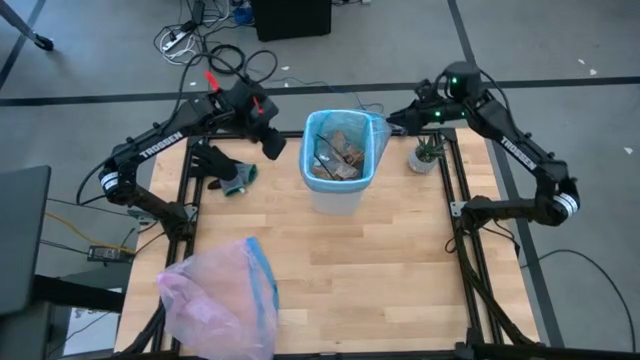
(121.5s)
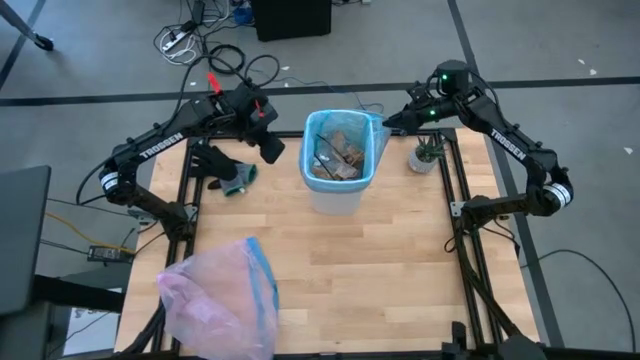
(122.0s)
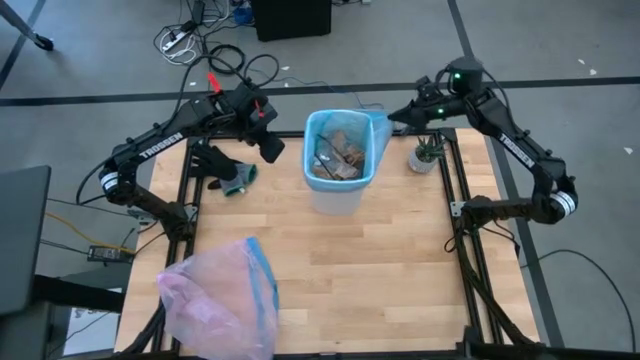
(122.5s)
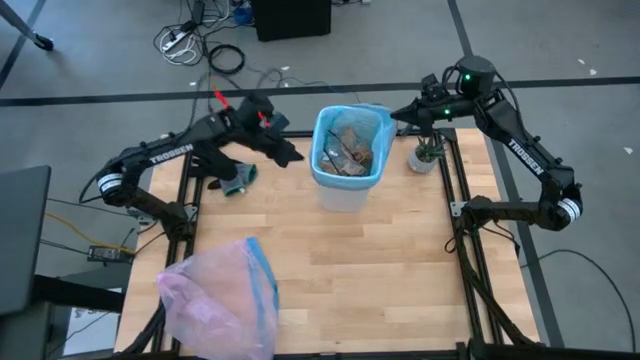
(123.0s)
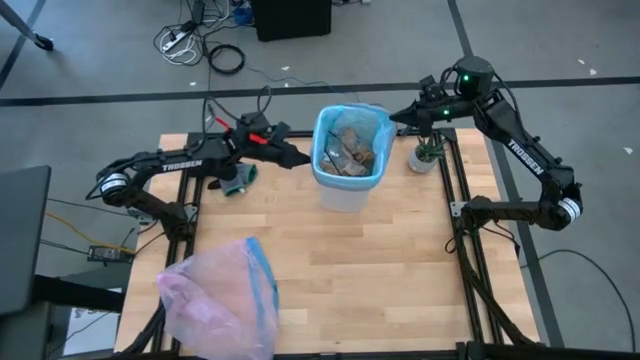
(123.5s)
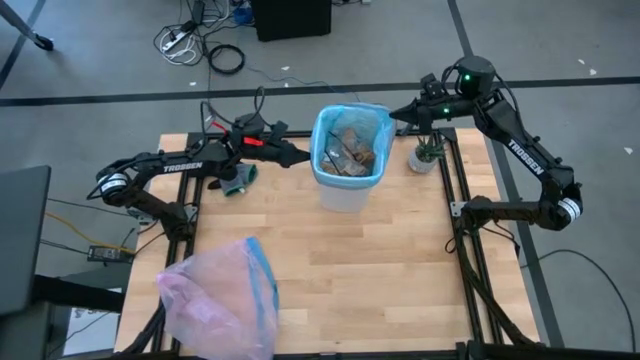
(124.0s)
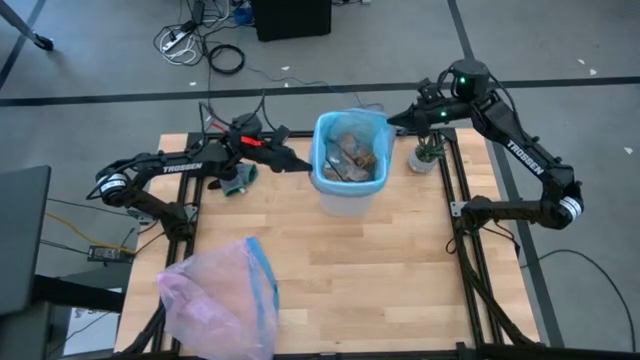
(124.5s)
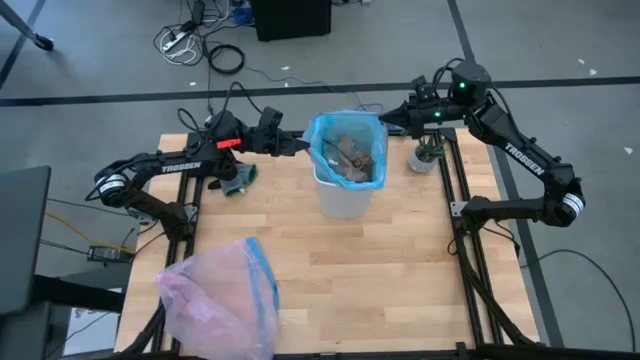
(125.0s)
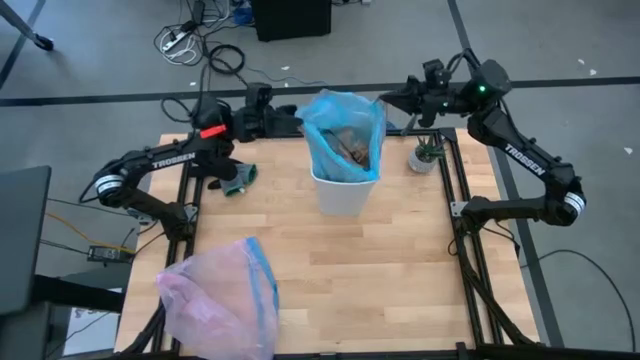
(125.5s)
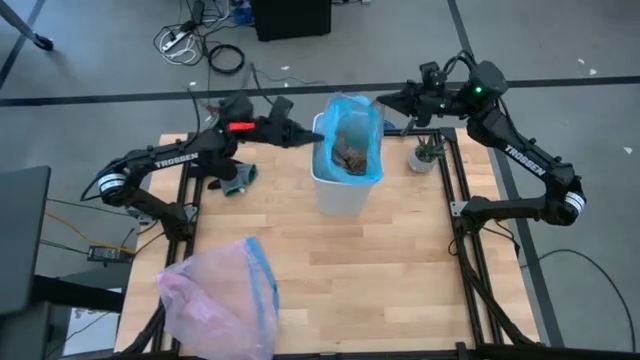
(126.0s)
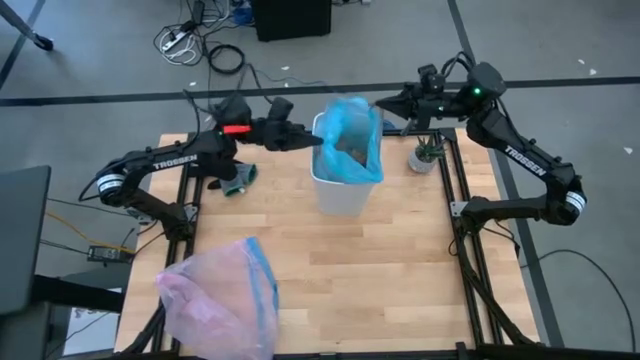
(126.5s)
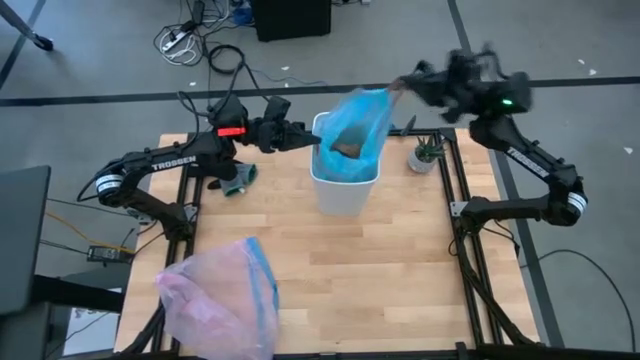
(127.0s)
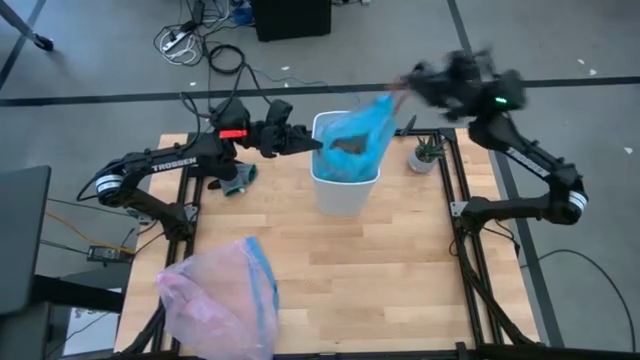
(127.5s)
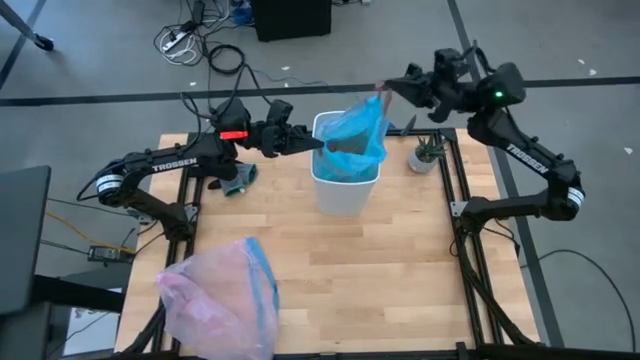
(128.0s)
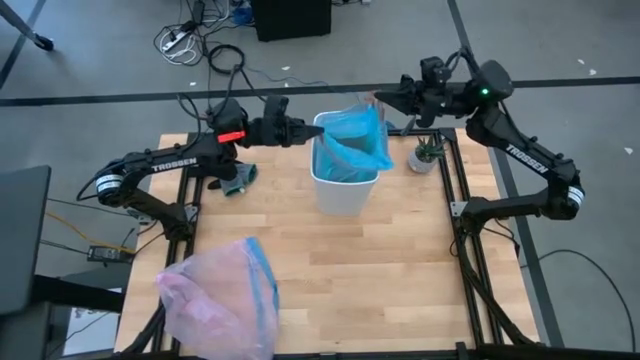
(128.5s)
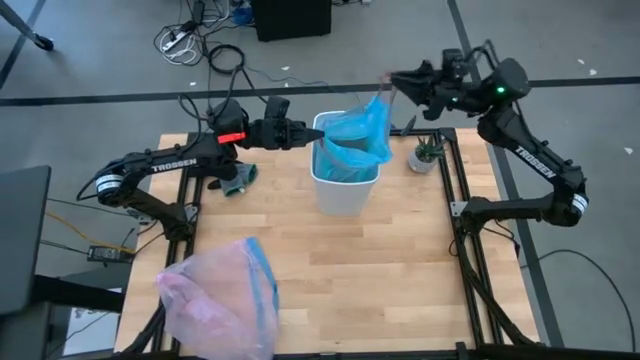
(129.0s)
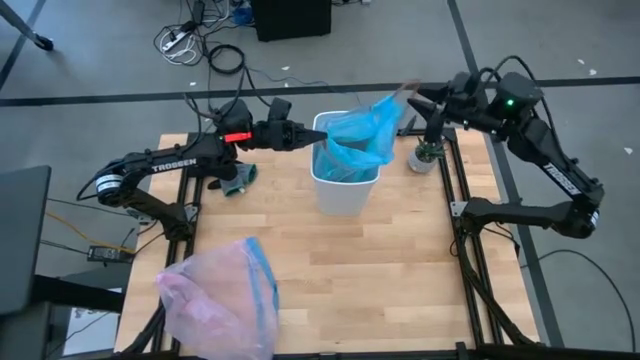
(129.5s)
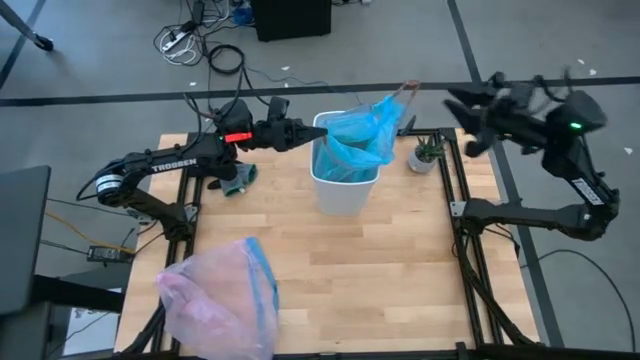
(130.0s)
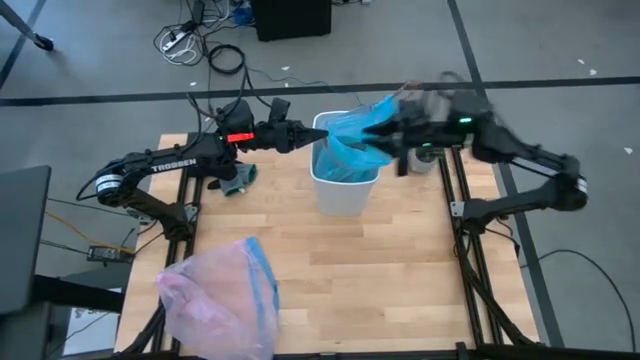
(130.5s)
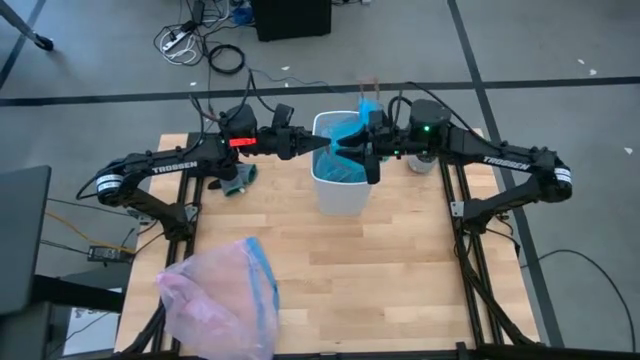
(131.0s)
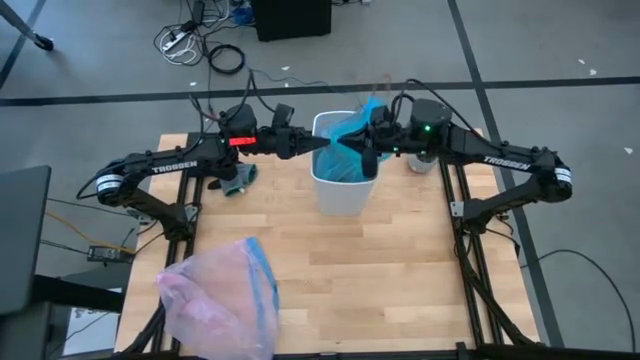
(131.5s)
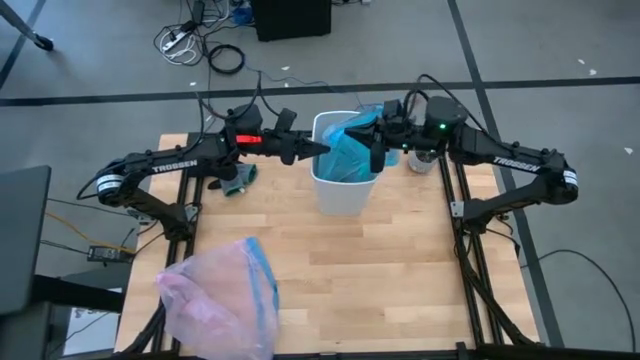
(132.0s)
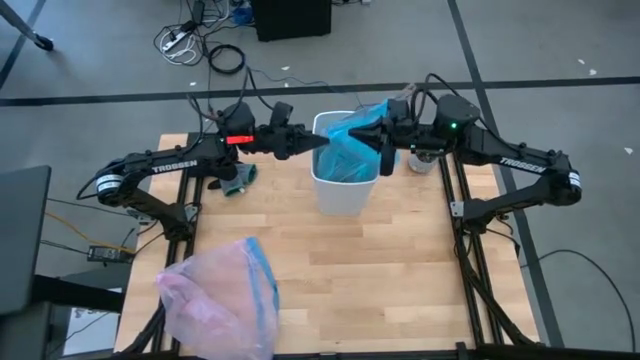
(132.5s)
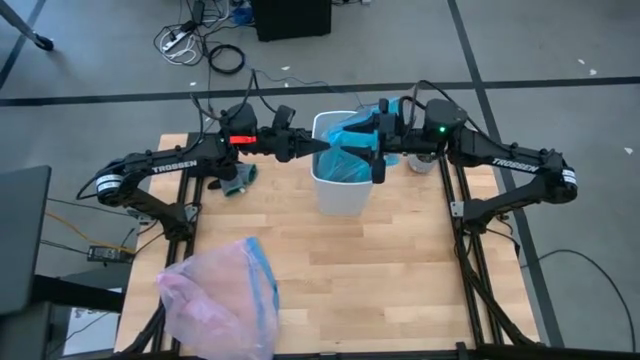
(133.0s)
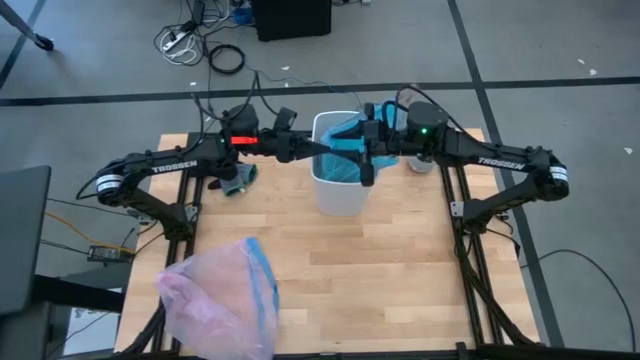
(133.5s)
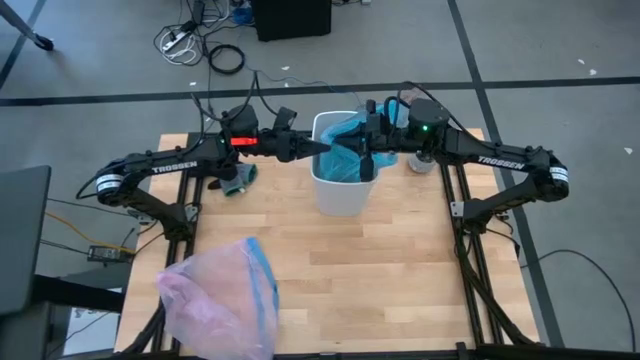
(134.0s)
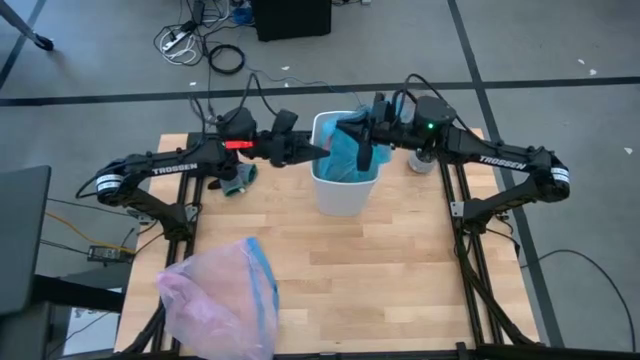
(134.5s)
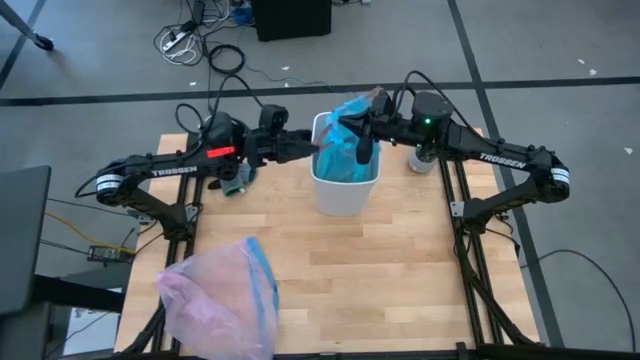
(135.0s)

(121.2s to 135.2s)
Task: place trash/remove bag and relplace
Remove the trash bag from the trash bin

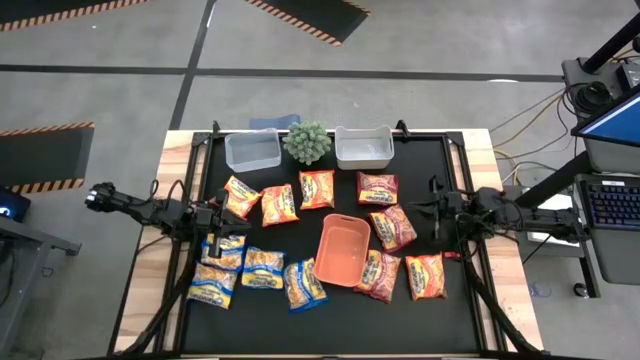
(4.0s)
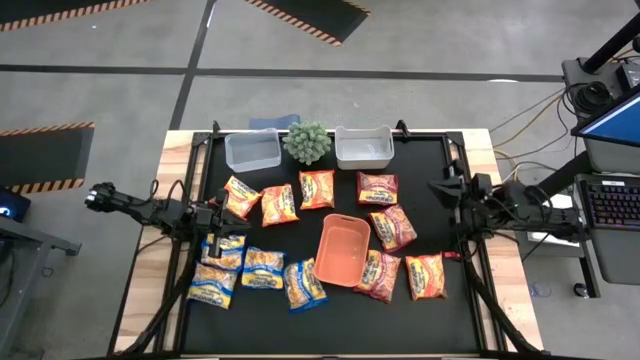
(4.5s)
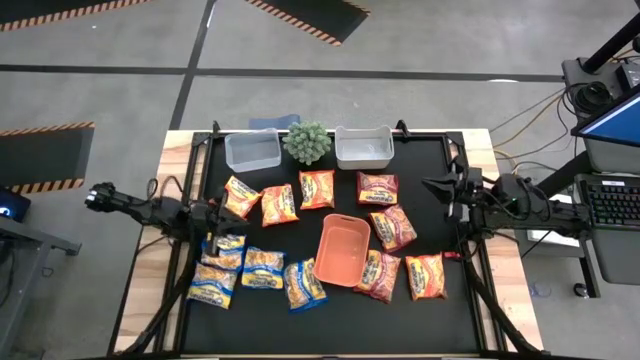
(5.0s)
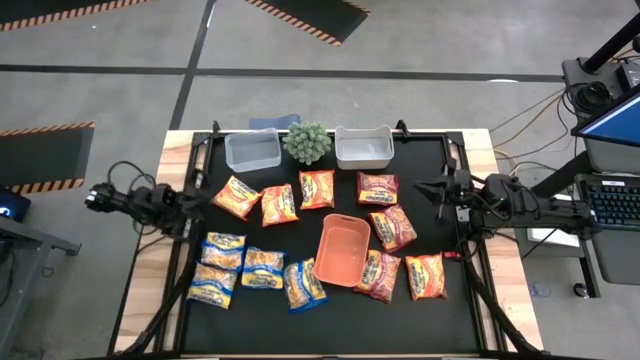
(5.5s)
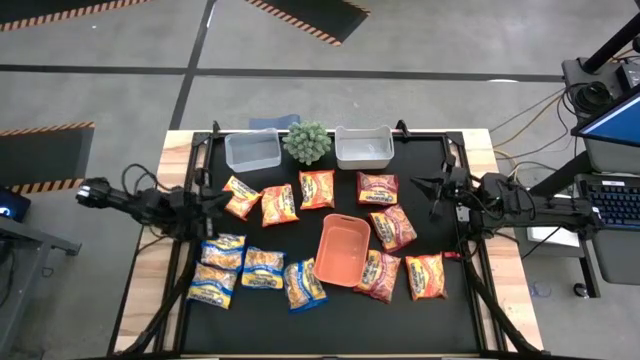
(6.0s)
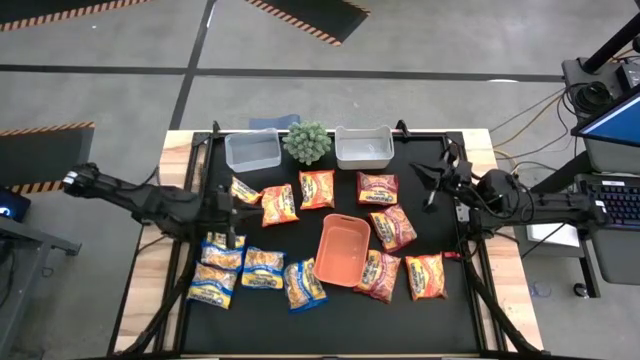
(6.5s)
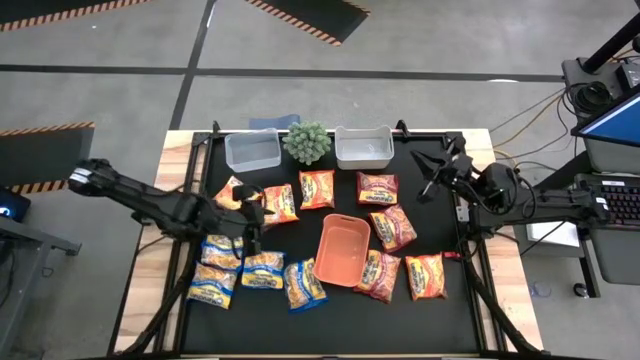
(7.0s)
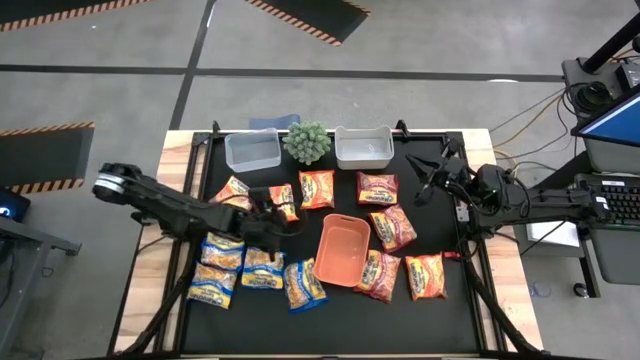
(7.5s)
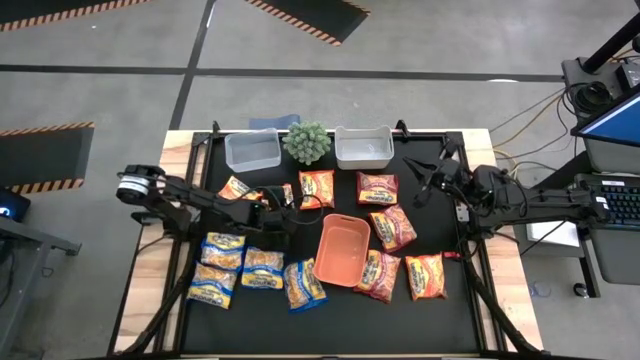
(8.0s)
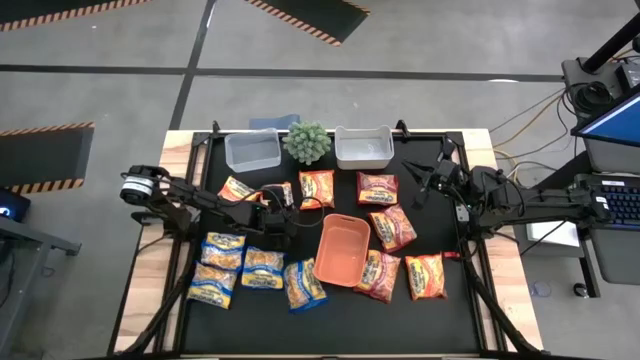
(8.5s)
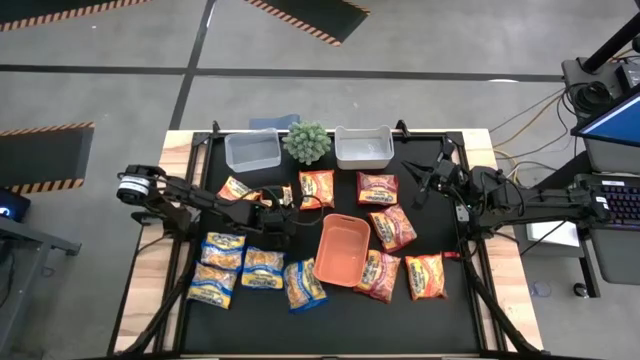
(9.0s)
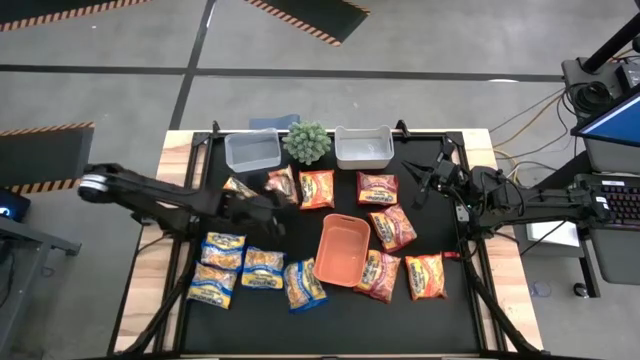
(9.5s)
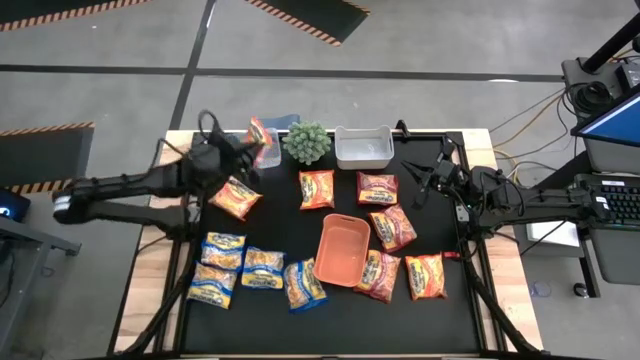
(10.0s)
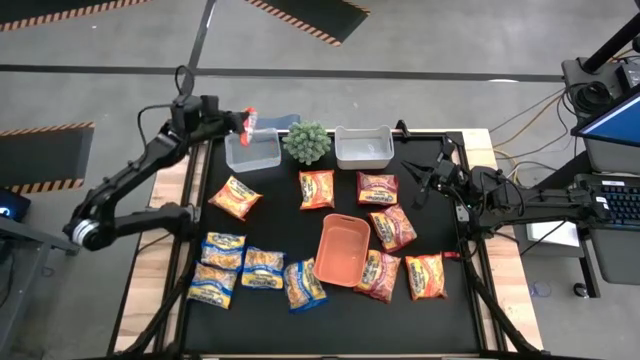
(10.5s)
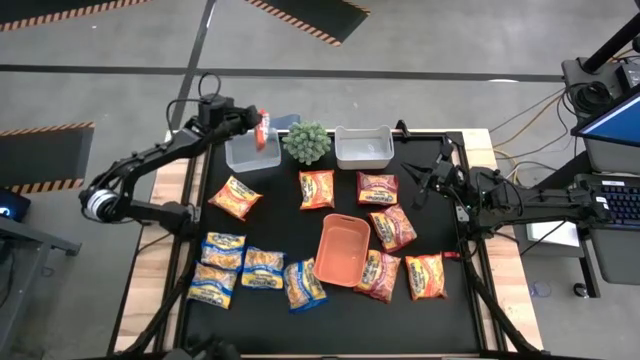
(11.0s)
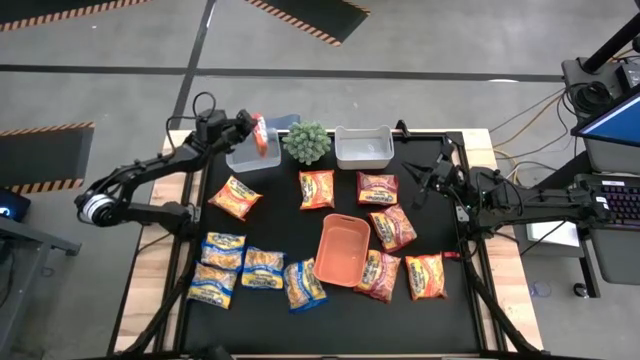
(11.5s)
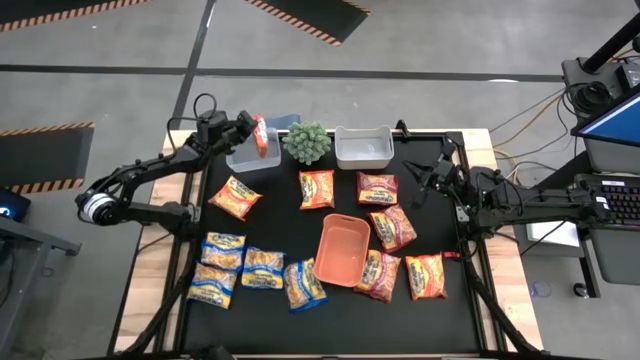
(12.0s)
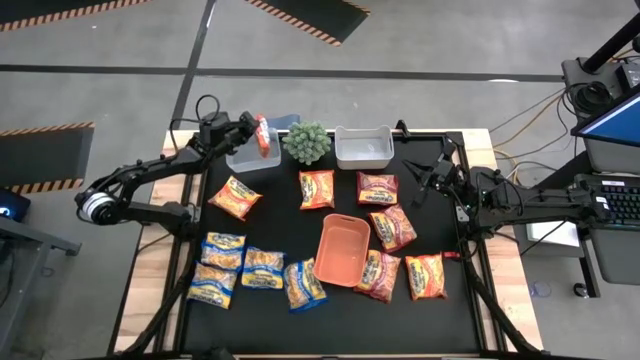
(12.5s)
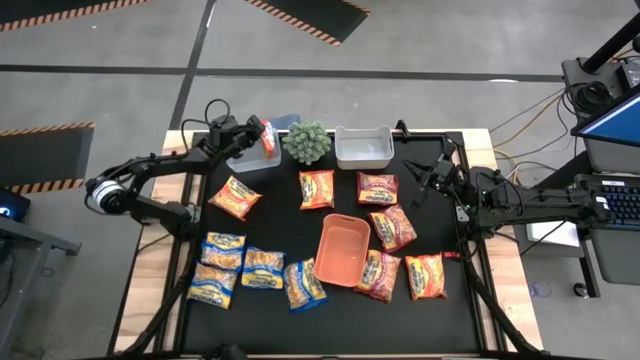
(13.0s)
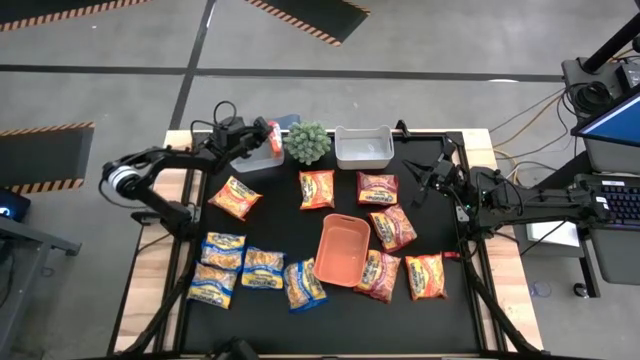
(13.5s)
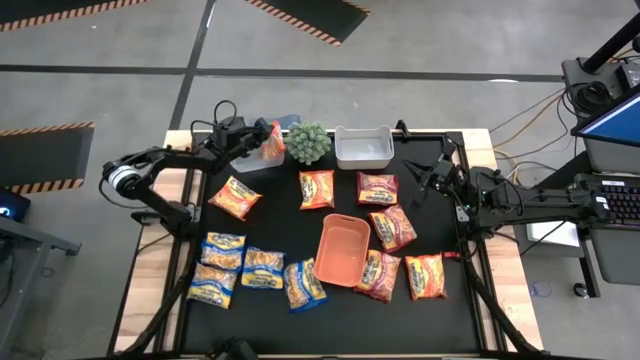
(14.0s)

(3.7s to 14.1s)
Task: Sort Maruchan noodles
Put the orange noodle pack into the transparent bin
